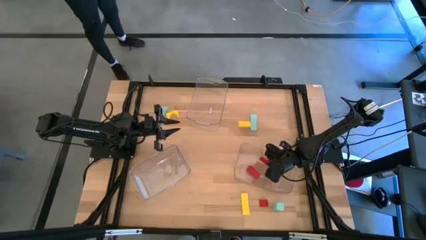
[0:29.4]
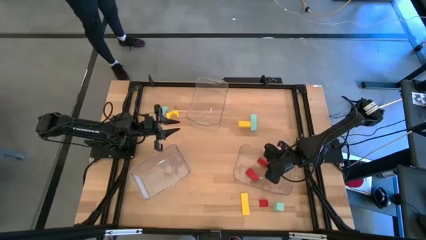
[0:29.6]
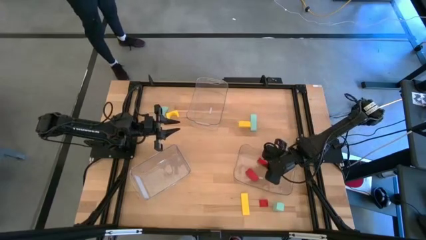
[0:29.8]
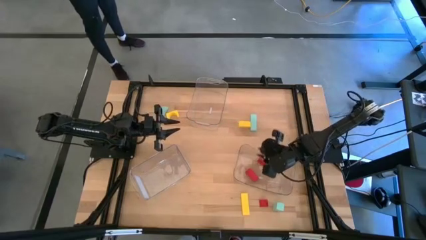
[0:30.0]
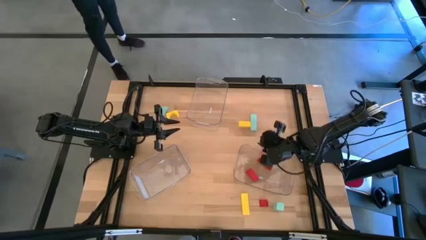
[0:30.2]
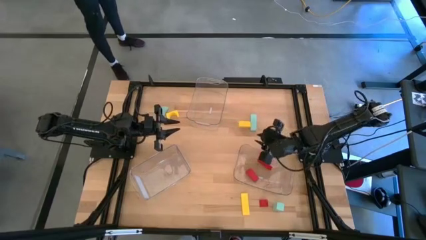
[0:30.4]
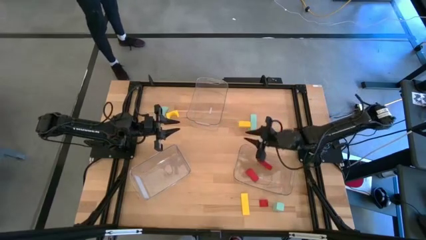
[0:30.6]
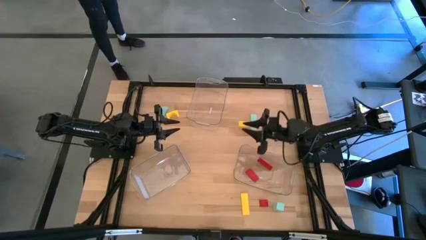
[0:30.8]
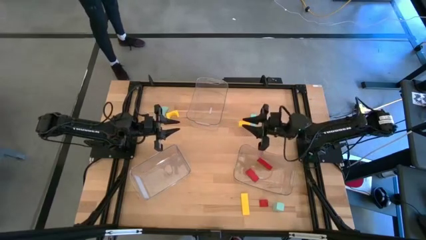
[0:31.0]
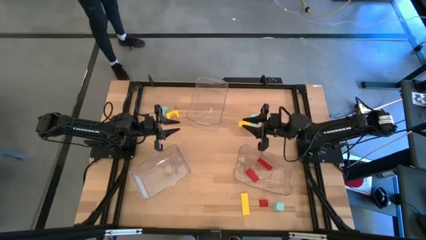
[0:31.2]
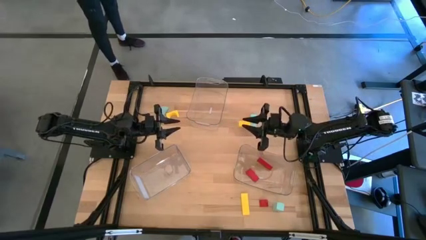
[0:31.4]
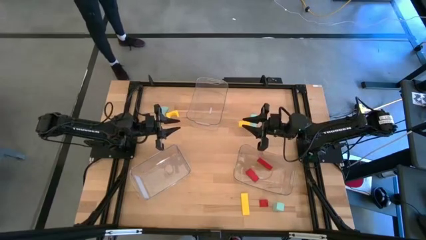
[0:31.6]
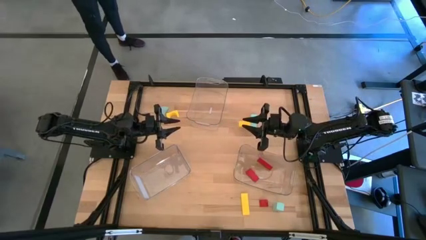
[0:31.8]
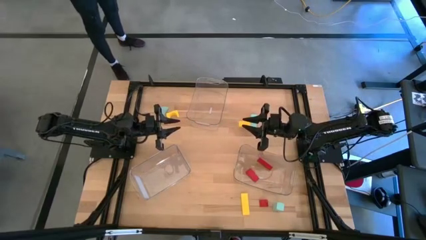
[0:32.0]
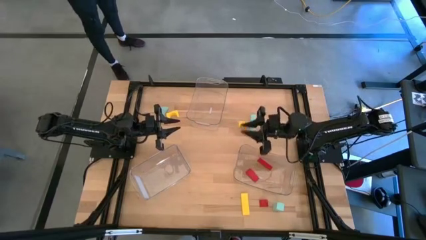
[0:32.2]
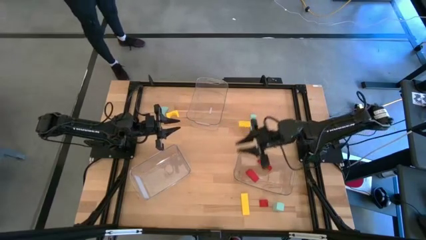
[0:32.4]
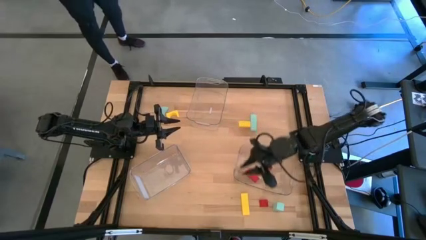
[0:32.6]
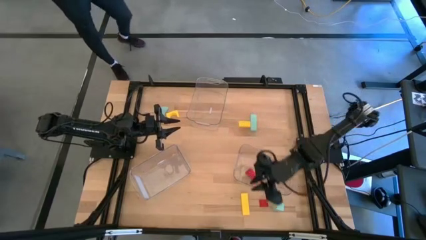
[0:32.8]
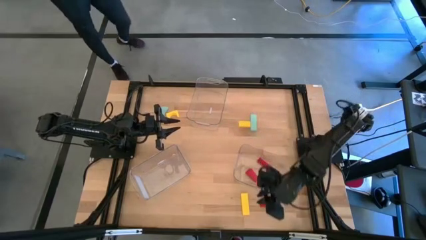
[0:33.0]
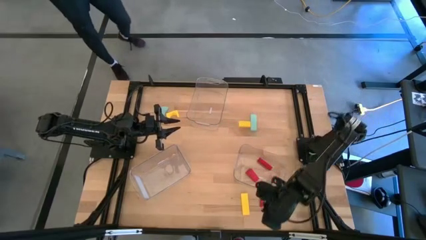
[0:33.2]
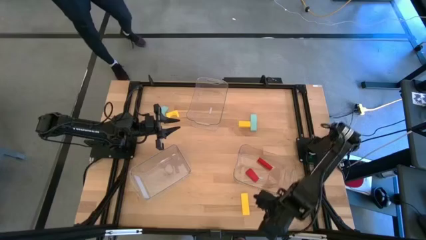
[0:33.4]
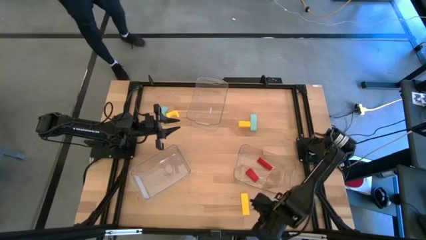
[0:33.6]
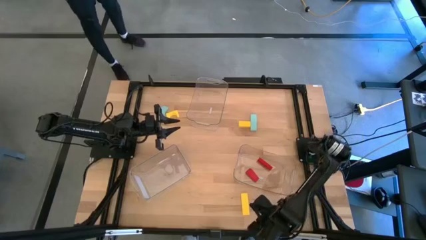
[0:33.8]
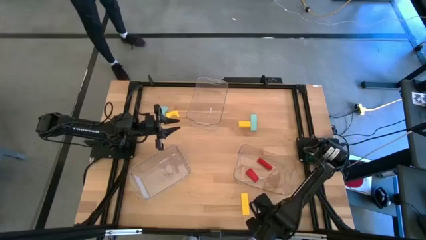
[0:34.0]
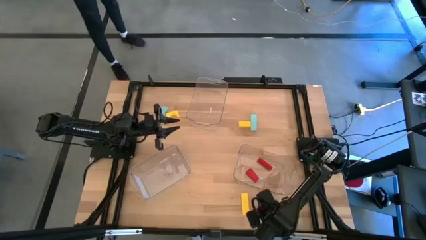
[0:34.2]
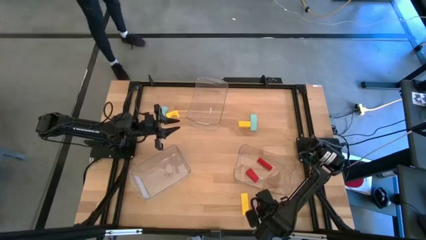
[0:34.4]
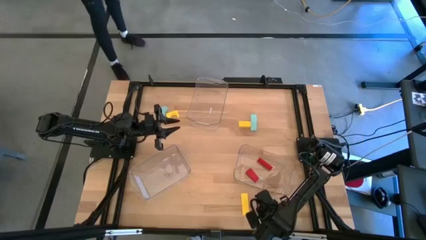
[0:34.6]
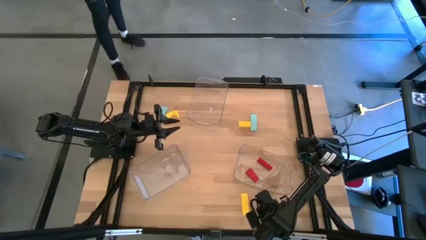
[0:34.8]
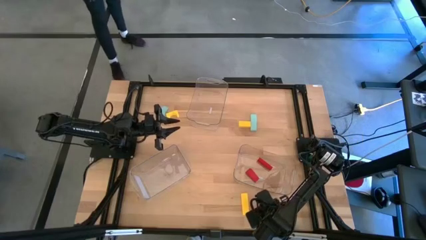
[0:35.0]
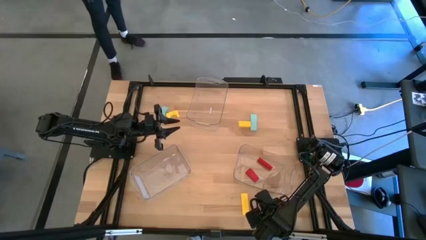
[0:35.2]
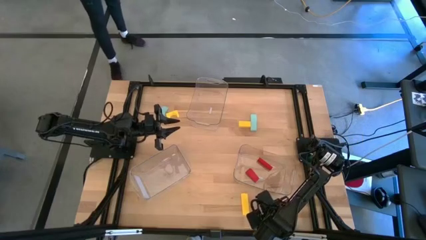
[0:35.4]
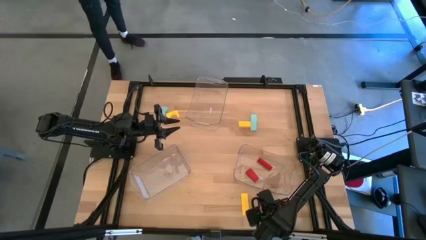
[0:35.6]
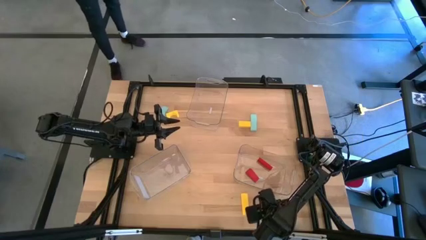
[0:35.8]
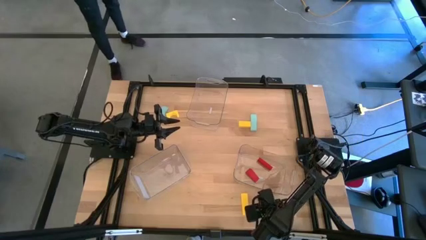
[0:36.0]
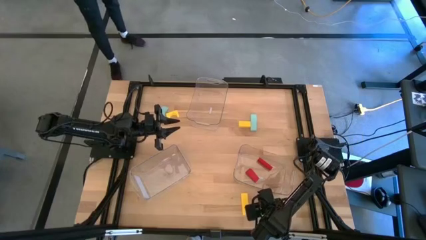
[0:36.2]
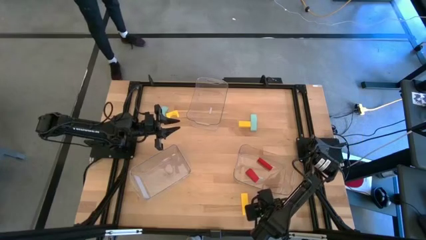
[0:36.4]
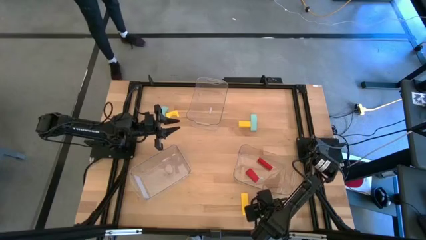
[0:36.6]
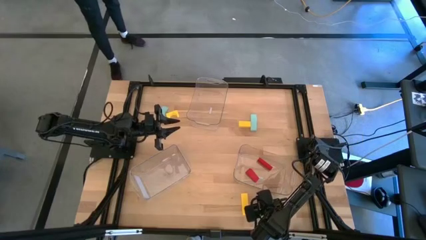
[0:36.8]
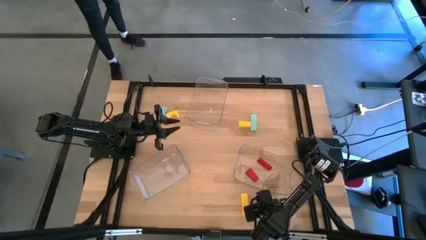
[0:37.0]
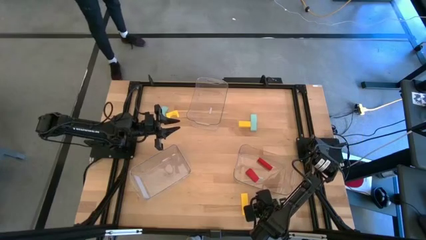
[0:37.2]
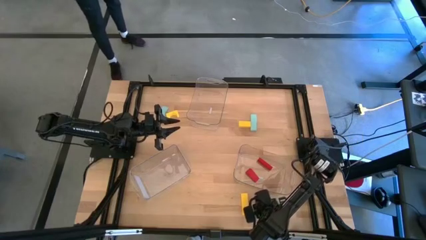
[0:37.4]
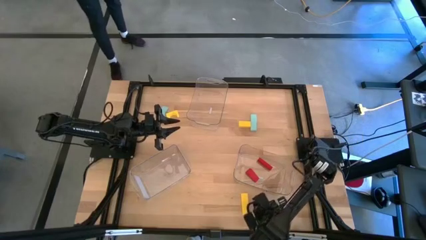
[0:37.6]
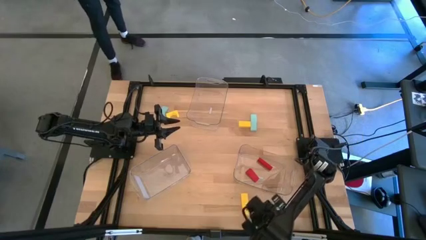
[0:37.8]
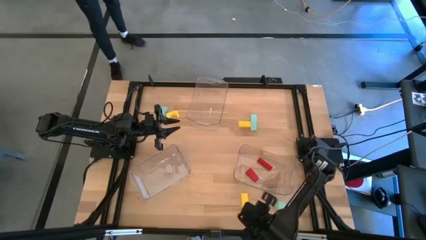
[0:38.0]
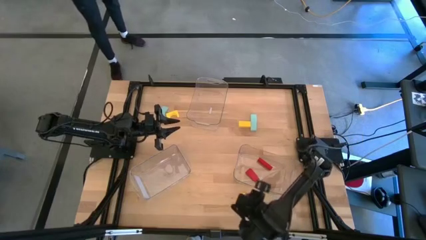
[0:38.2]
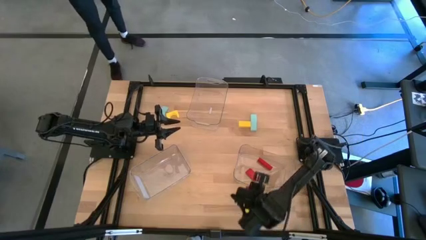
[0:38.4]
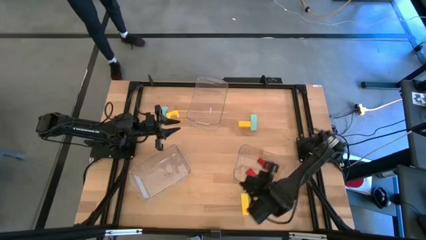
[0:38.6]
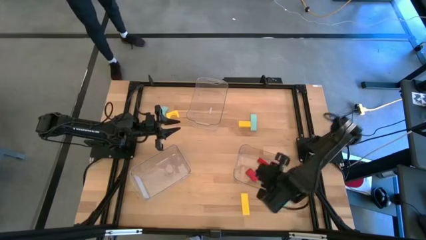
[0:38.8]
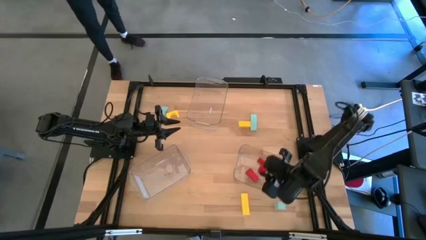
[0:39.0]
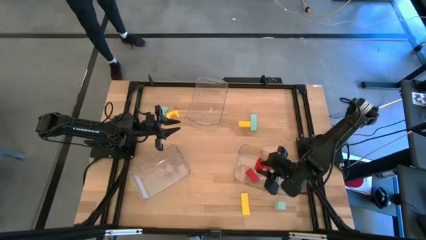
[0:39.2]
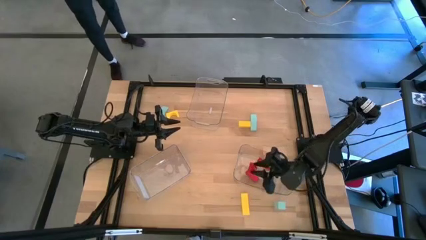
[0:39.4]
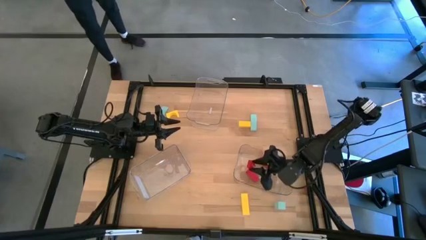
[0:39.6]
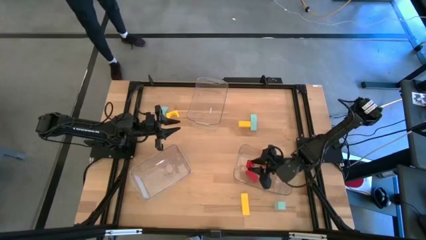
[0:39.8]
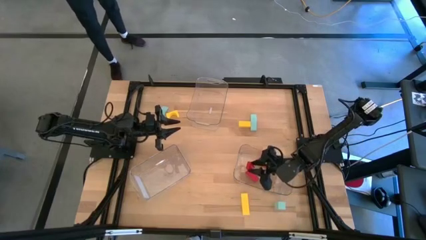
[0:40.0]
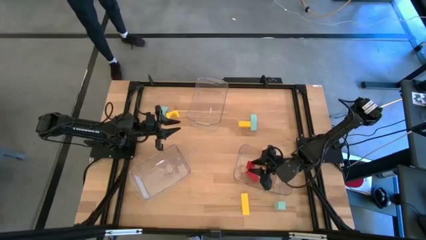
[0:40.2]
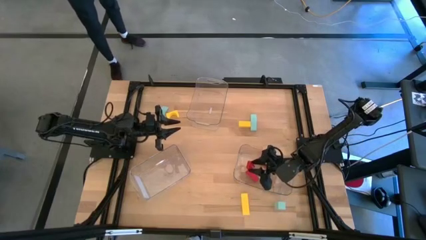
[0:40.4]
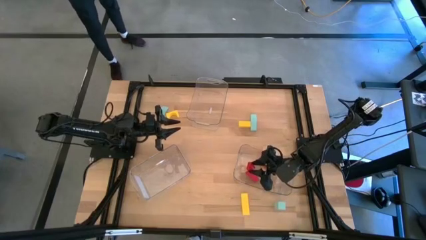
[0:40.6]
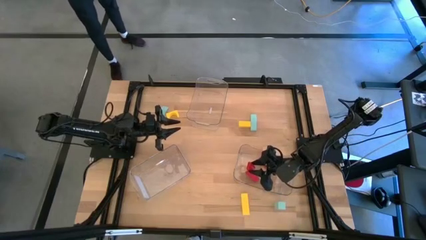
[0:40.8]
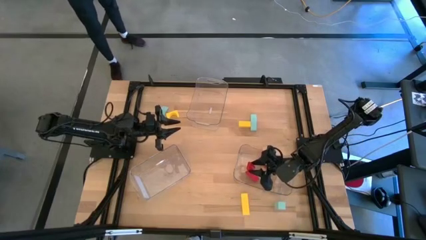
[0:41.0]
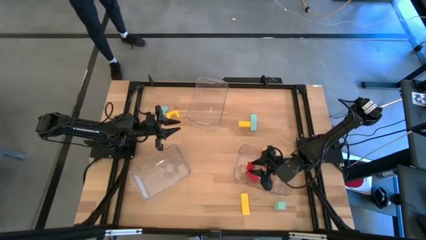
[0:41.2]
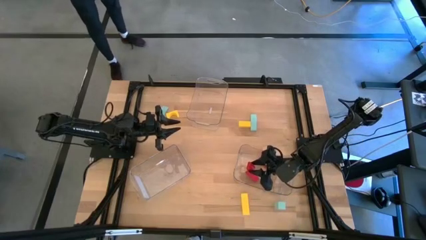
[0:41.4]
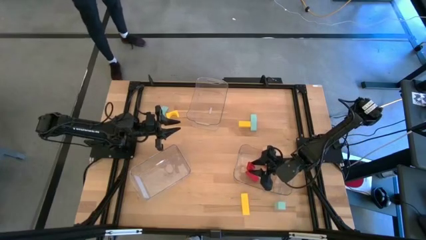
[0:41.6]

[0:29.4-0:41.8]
Task: Sort & place blocks by color
Put the the red block into the bottom right transparent bin
